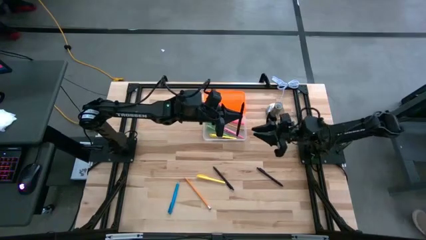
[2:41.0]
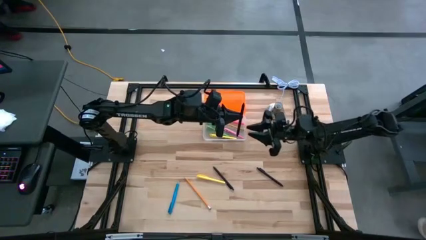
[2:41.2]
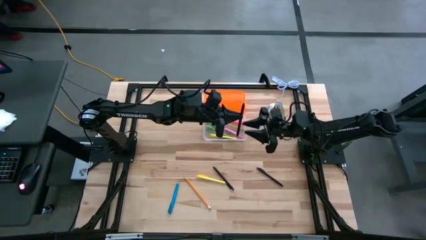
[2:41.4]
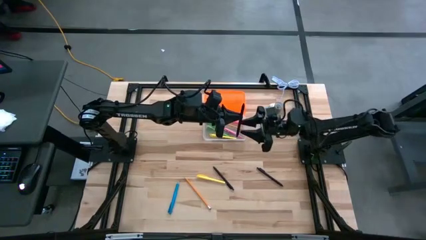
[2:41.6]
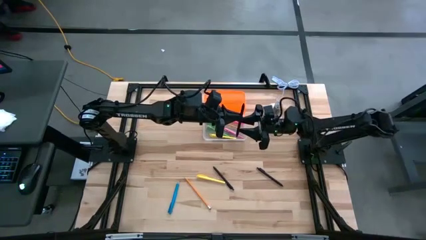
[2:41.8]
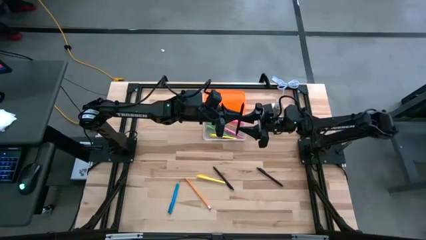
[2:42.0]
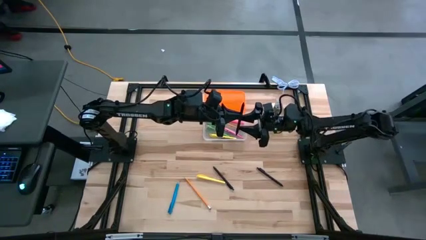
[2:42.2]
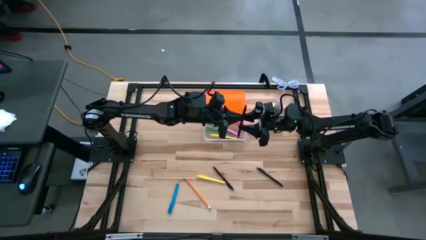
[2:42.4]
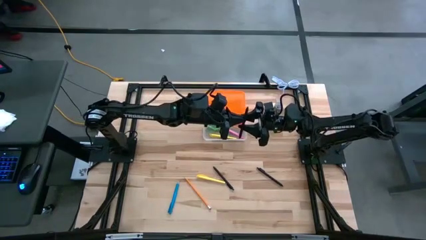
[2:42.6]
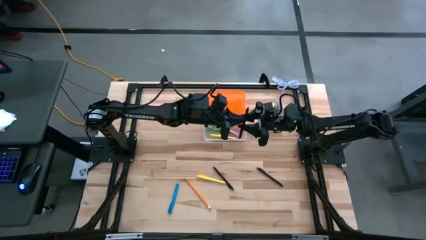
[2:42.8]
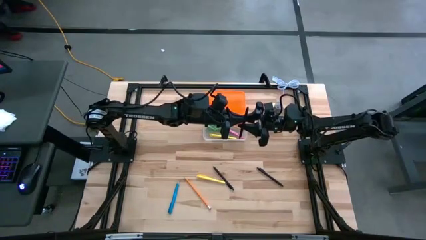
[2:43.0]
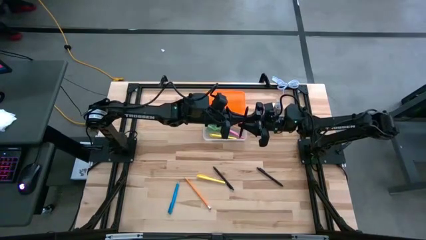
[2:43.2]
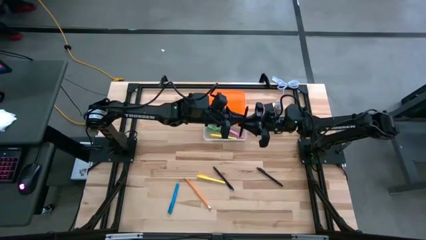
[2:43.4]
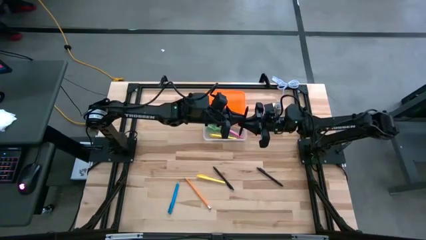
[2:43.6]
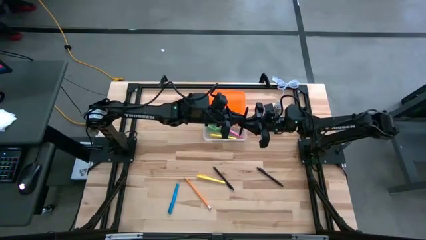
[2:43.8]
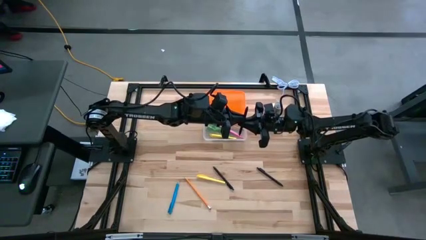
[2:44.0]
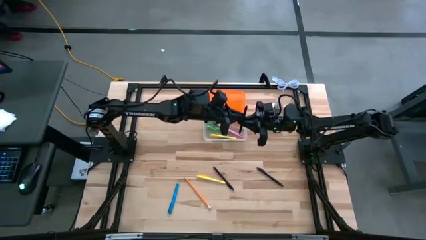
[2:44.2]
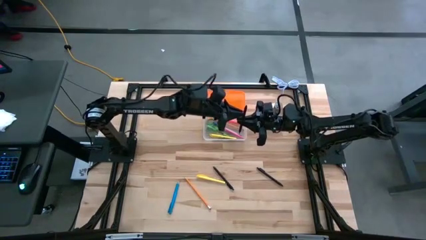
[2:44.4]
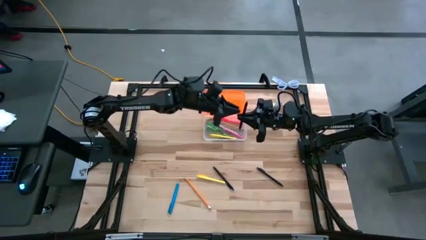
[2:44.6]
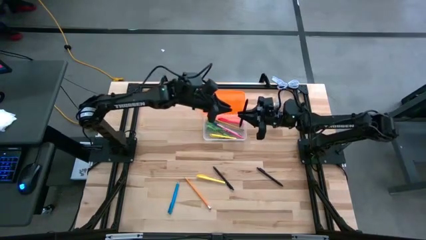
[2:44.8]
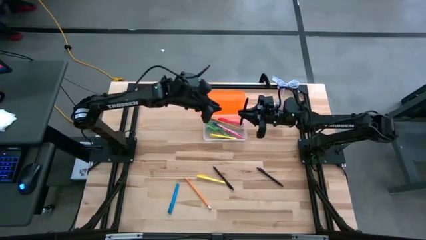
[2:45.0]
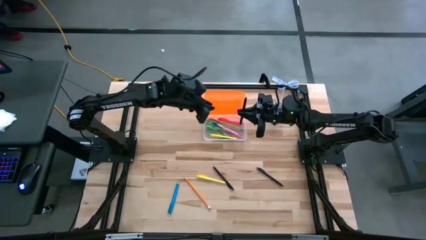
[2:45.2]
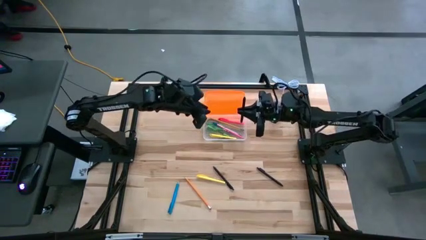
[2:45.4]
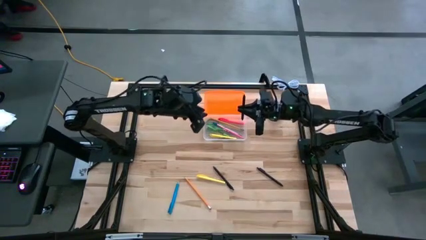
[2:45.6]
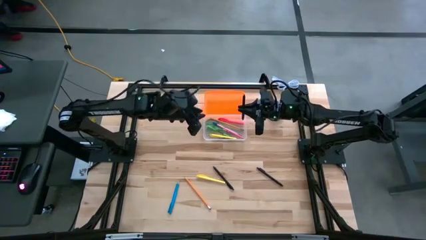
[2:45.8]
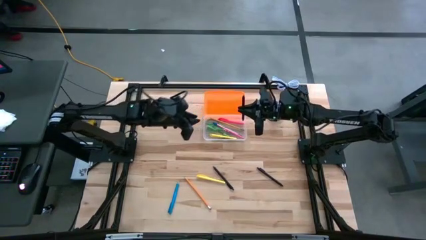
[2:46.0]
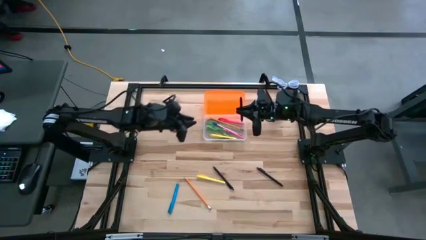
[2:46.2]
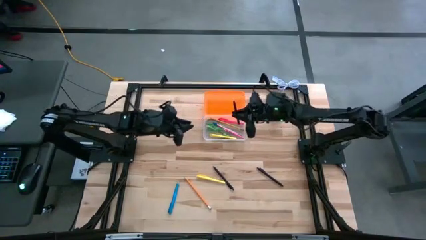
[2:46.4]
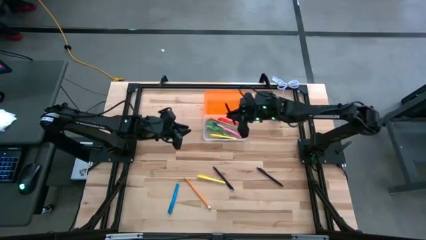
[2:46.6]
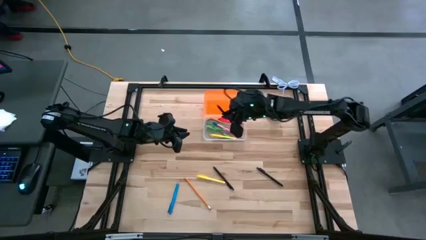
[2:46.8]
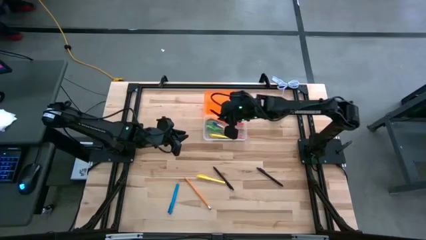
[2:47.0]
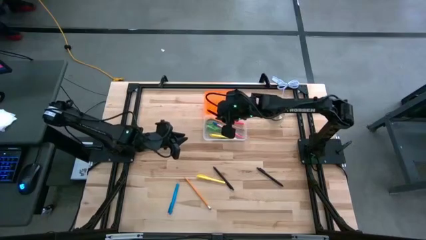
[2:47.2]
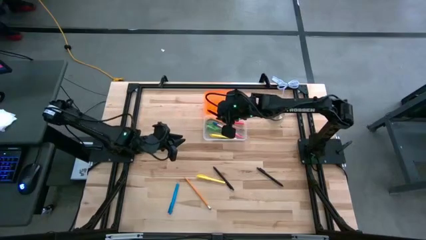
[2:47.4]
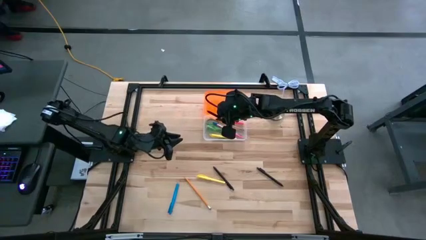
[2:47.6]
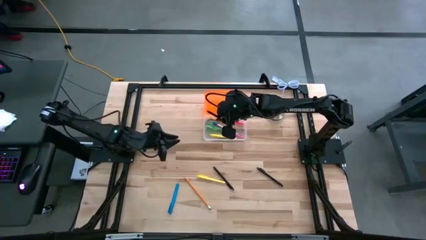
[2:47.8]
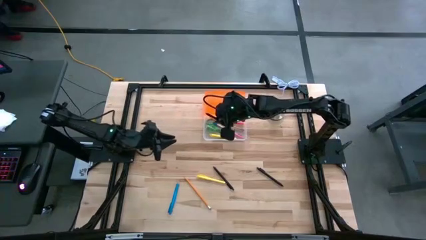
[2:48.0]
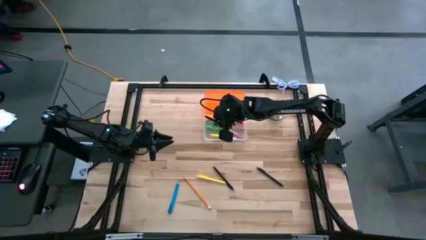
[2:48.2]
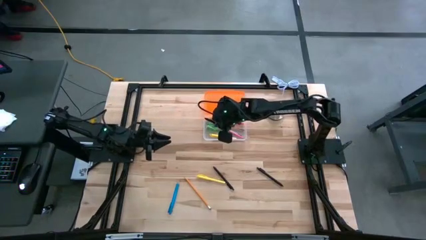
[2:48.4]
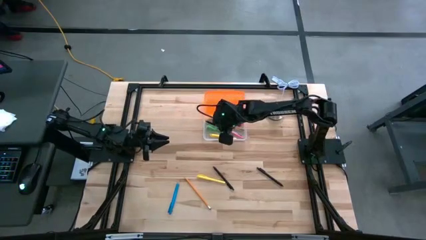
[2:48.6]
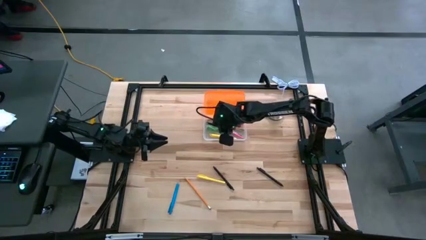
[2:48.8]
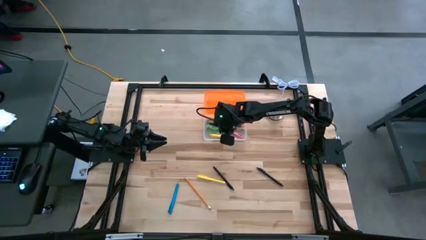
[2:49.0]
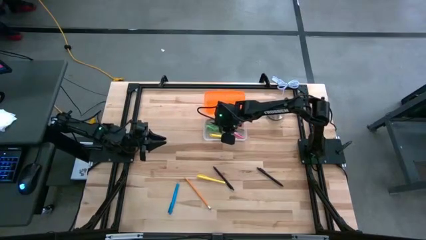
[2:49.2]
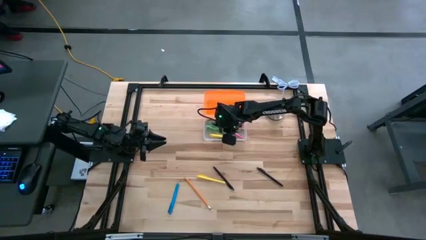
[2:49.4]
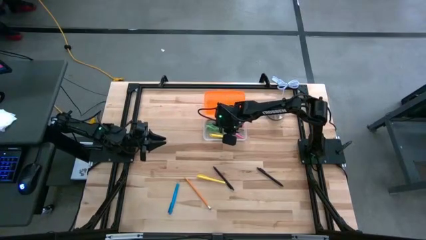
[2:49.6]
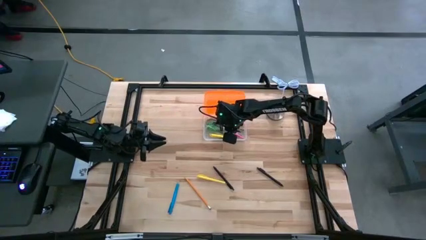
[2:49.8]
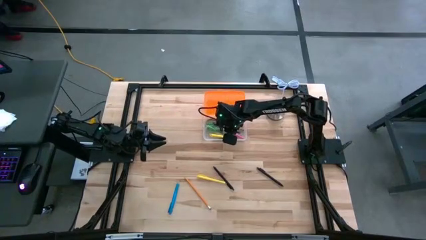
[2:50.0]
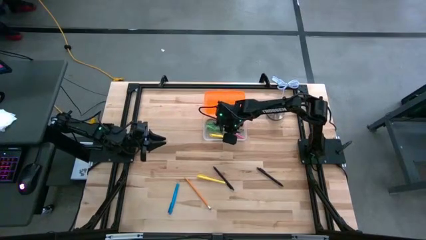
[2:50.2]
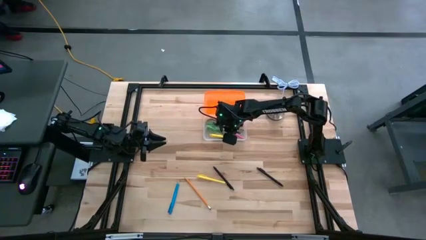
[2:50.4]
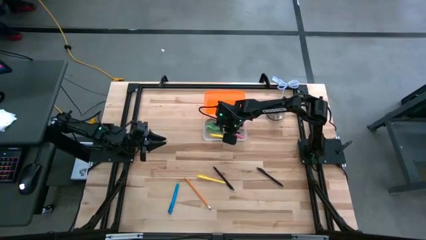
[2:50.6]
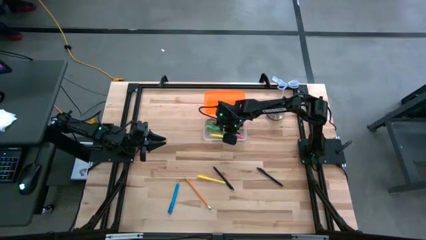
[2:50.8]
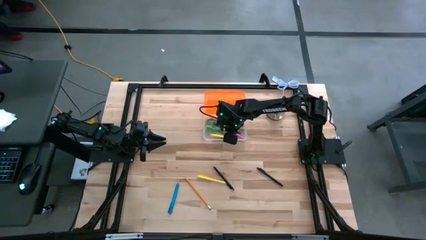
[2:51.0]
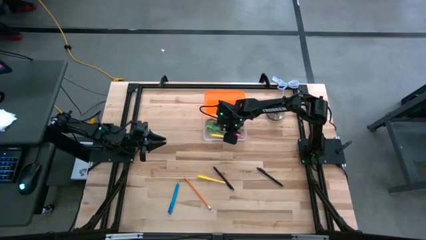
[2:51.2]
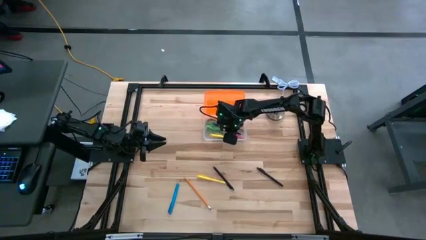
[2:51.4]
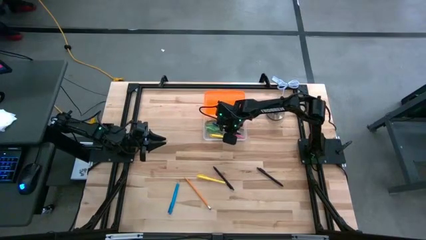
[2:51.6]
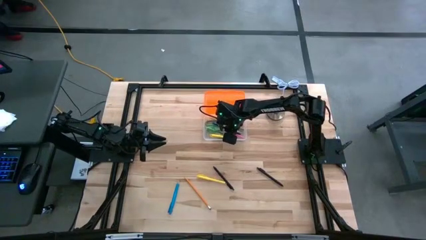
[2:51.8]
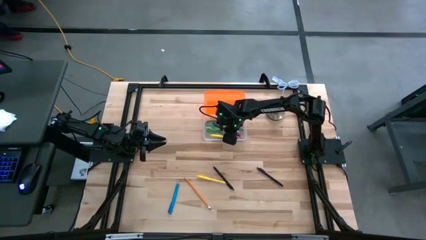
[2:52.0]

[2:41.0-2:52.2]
Task: Pick & place school supplies into a supply box
Put the left black pen into the supply box

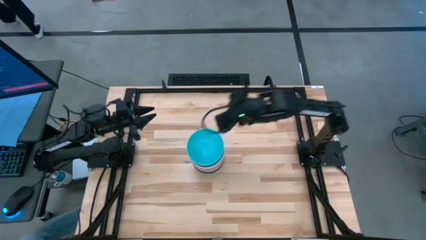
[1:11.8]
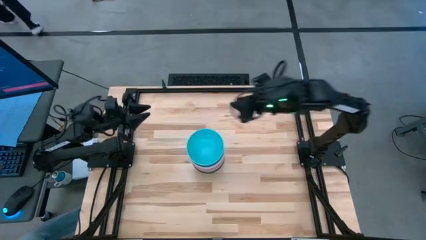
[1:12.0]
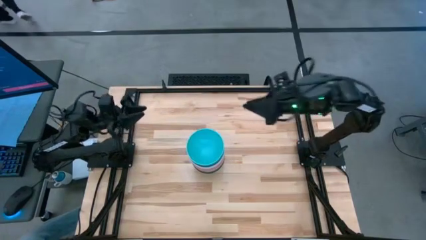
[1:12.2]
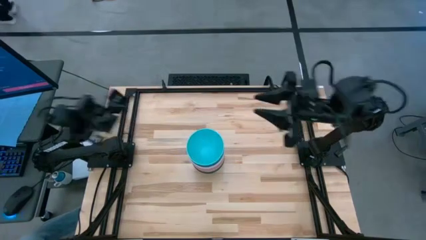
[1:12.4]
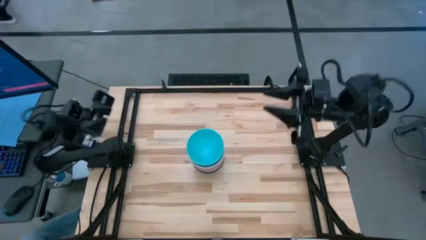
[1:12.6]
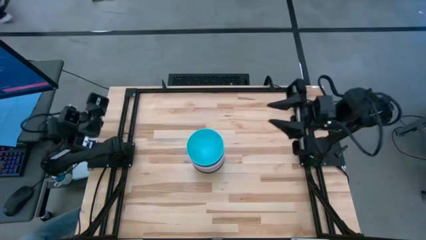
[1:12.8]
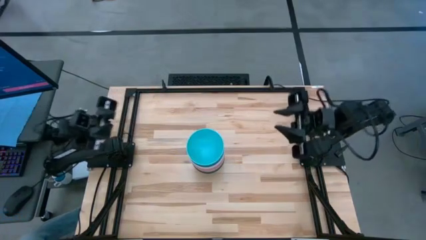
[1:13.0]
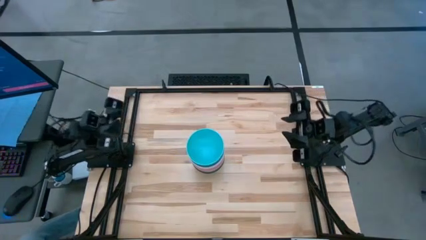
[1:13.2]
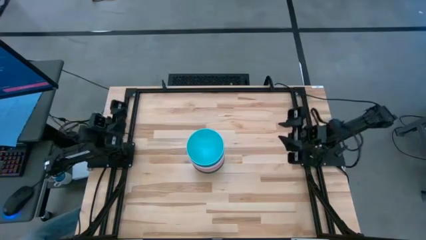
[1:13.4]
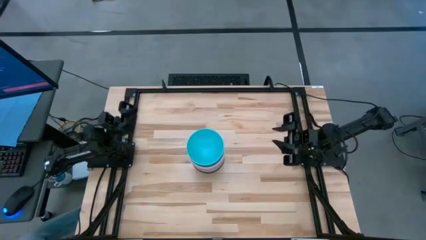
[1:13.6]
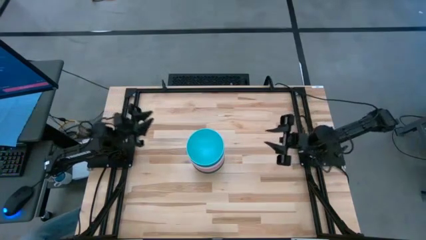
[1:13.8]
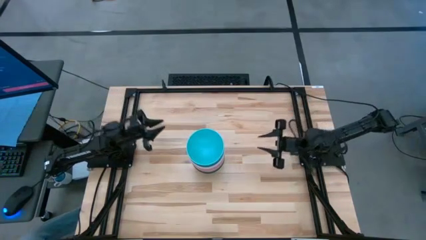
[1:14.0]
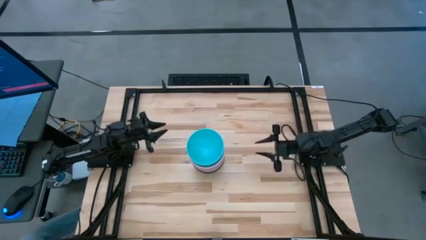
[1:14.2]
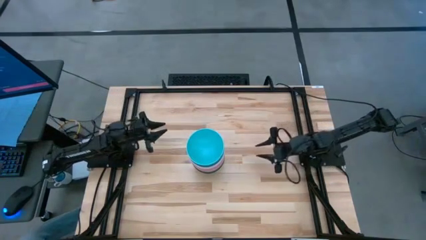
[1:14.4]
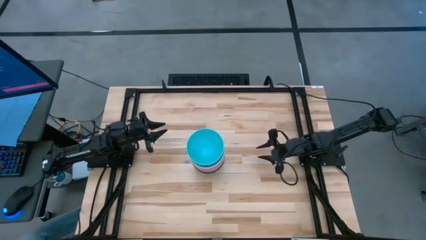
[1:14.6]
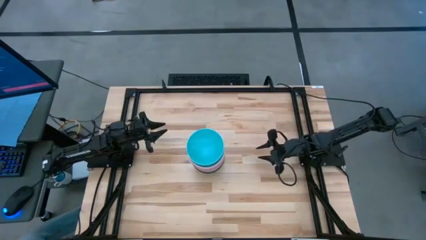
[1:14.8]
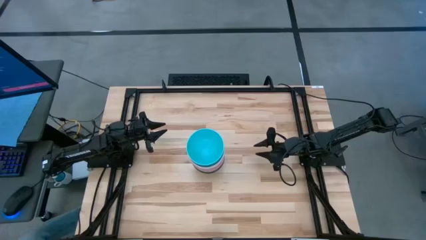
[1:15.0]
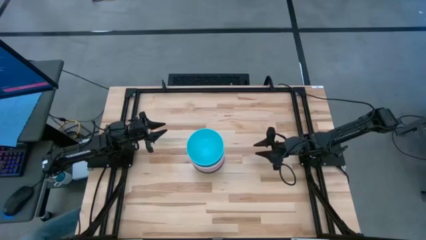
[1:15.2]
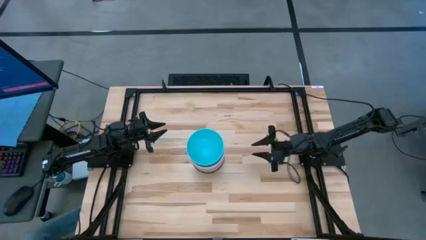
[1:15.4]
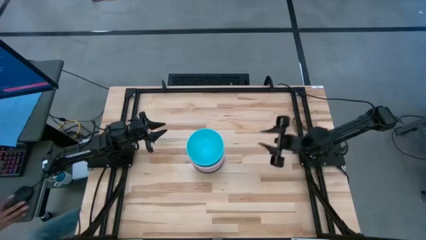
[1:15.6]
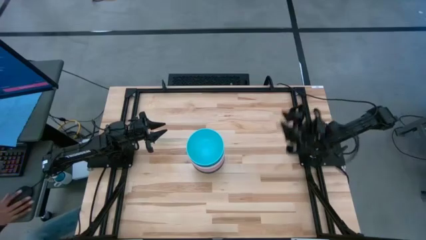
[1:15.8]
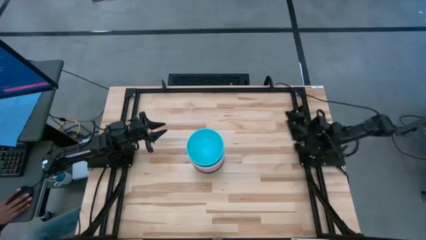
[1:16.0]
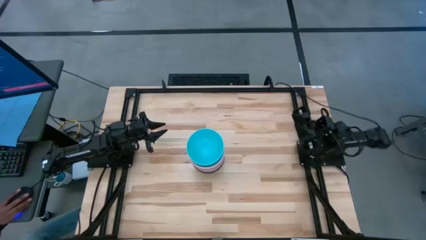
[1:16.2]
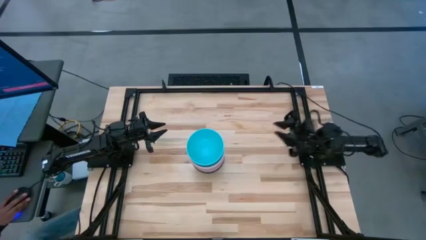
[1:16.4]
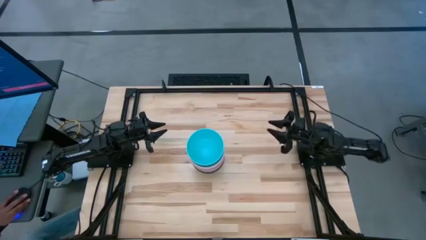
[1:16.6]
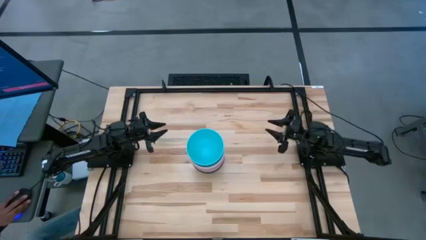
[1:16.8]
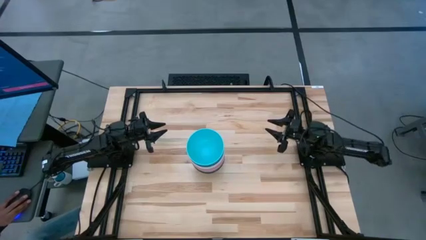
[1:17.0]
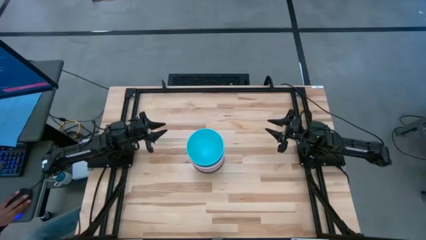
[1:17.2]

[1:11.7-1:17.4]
Task: Nest bowls inside each other
Return to Home Position
